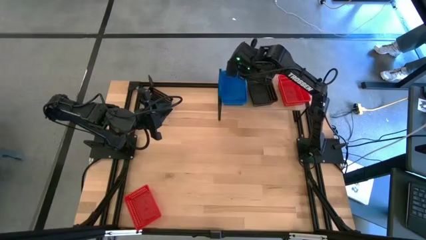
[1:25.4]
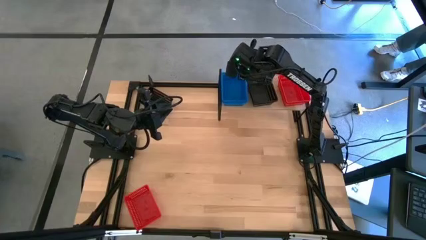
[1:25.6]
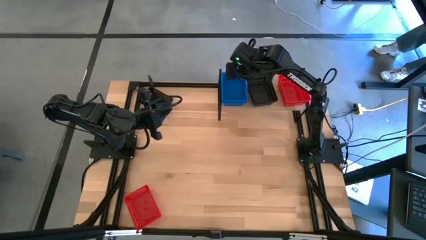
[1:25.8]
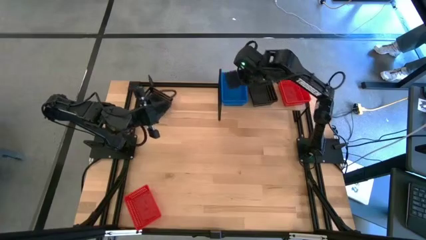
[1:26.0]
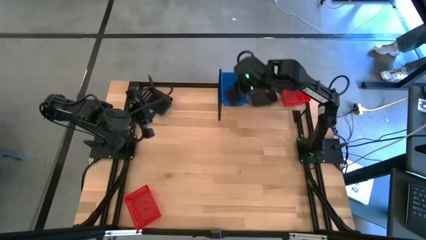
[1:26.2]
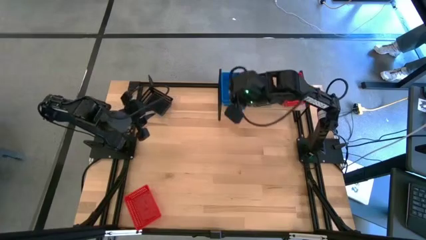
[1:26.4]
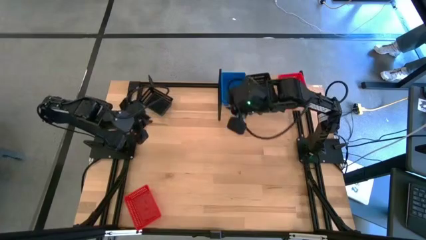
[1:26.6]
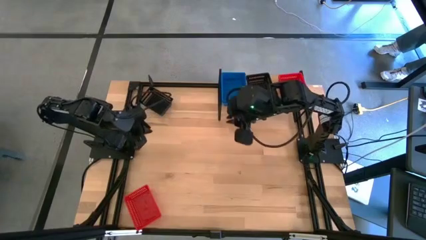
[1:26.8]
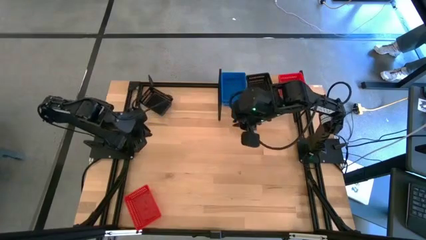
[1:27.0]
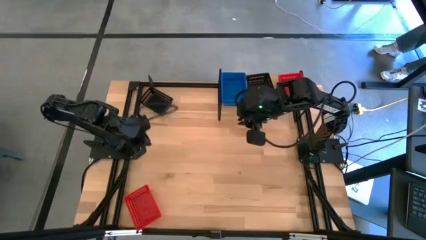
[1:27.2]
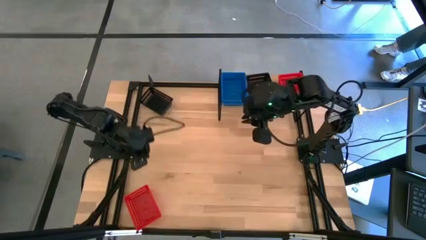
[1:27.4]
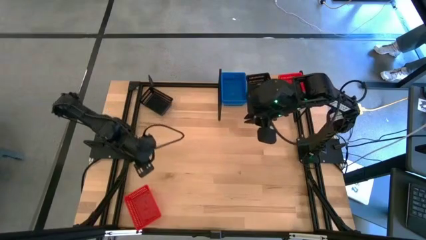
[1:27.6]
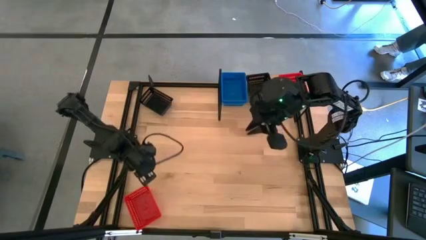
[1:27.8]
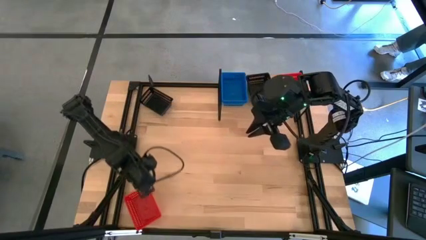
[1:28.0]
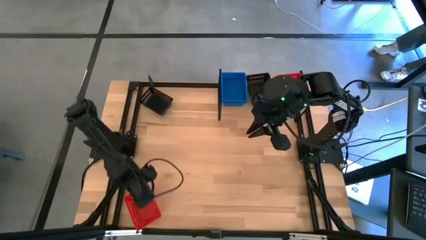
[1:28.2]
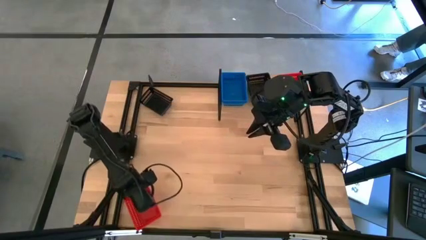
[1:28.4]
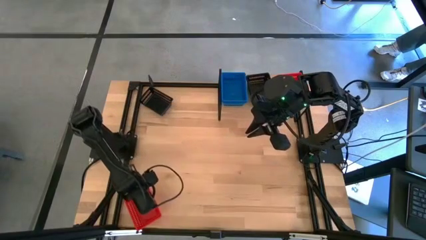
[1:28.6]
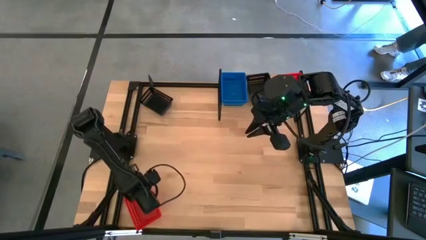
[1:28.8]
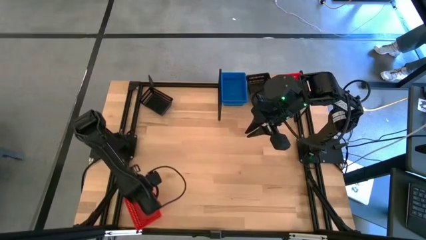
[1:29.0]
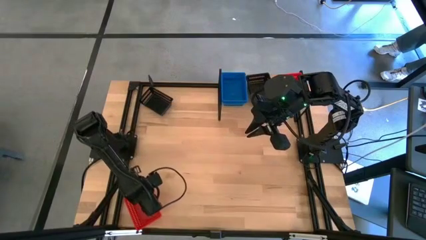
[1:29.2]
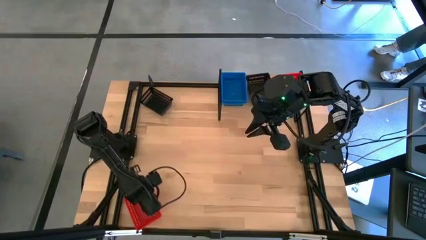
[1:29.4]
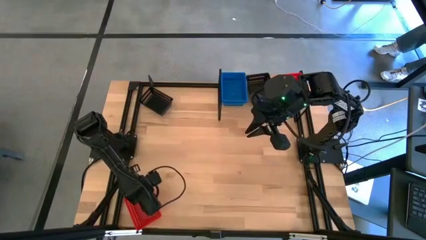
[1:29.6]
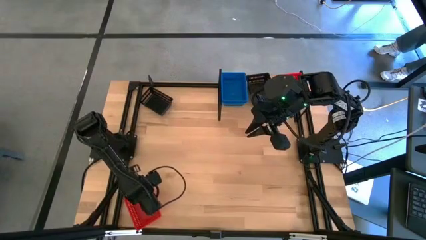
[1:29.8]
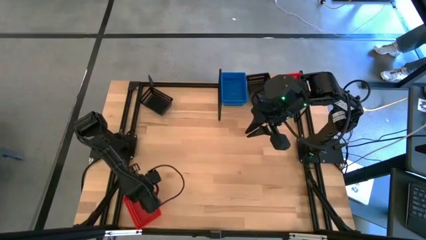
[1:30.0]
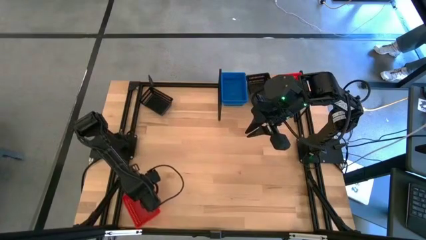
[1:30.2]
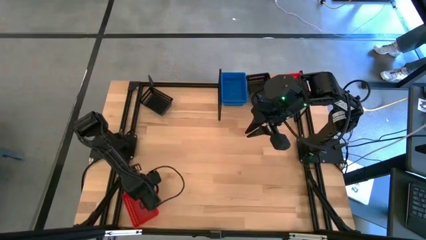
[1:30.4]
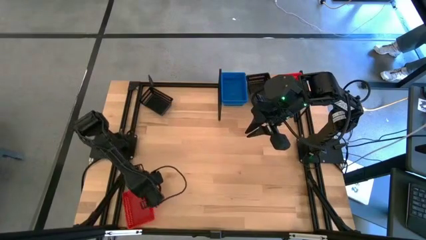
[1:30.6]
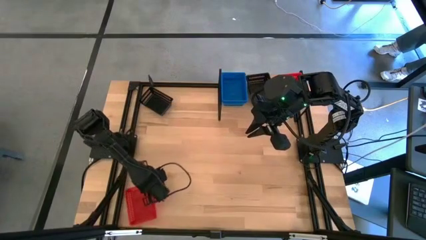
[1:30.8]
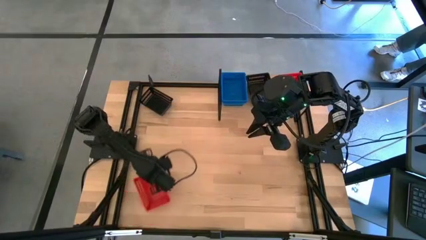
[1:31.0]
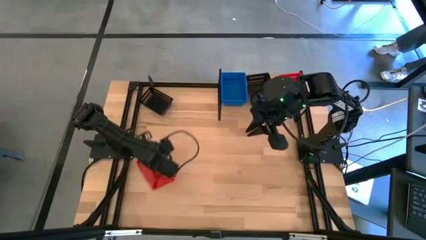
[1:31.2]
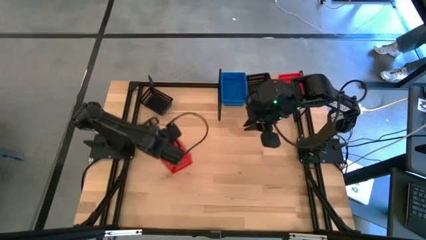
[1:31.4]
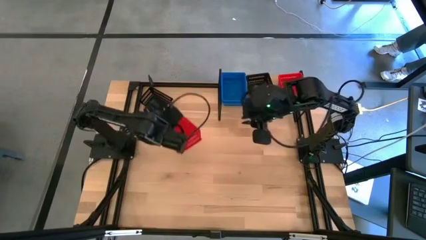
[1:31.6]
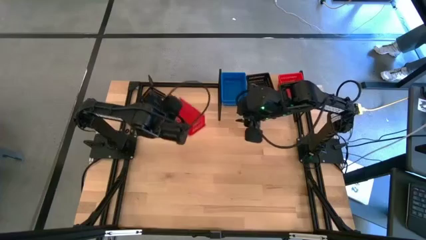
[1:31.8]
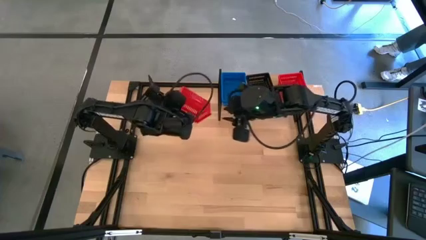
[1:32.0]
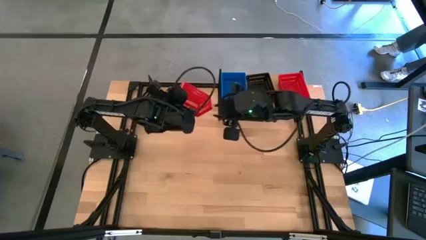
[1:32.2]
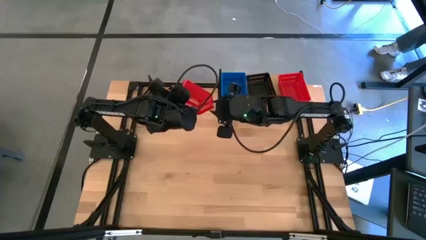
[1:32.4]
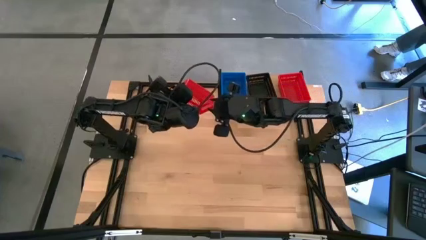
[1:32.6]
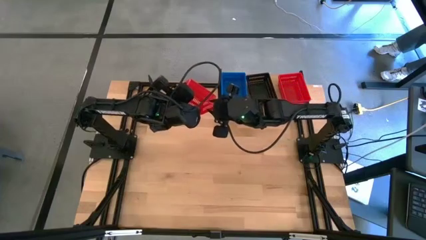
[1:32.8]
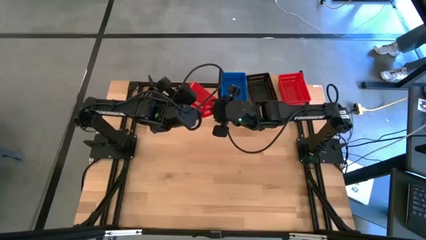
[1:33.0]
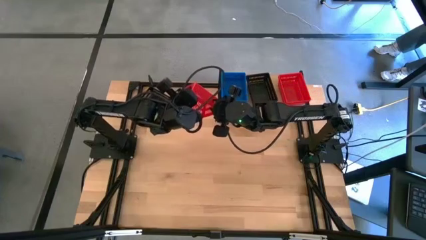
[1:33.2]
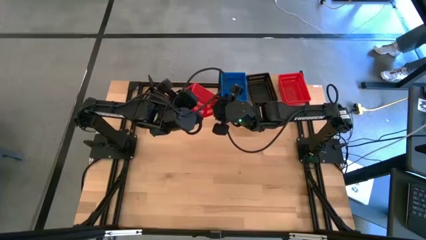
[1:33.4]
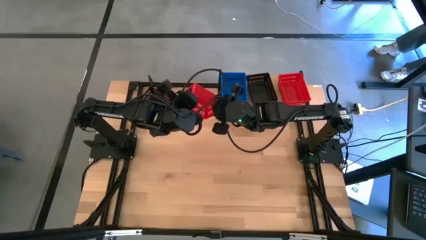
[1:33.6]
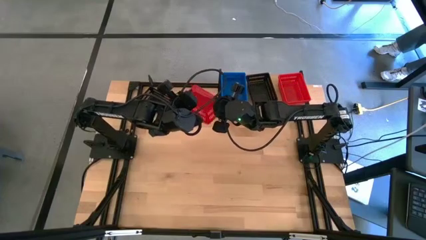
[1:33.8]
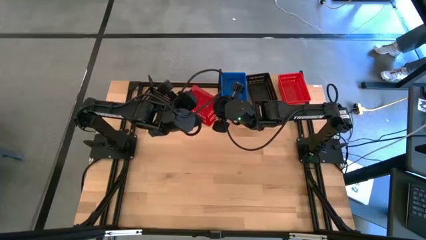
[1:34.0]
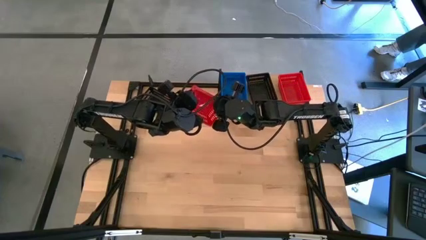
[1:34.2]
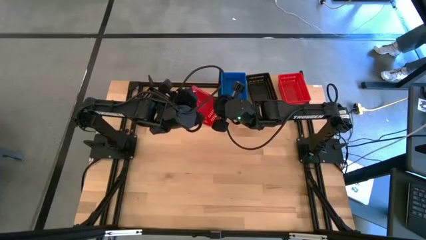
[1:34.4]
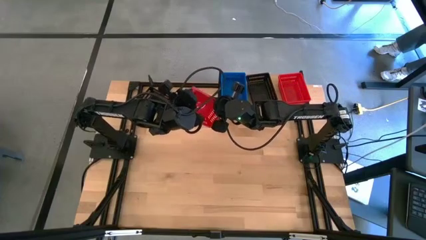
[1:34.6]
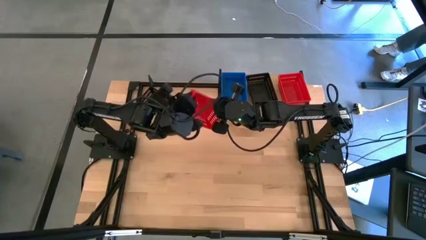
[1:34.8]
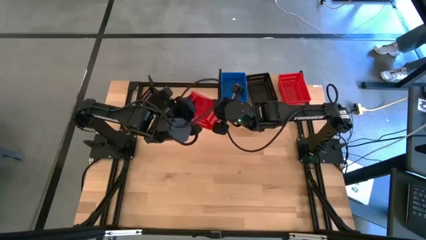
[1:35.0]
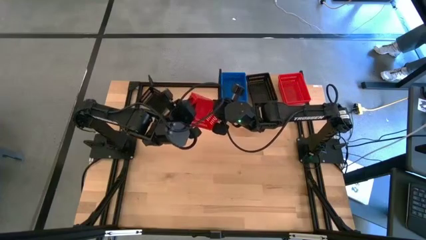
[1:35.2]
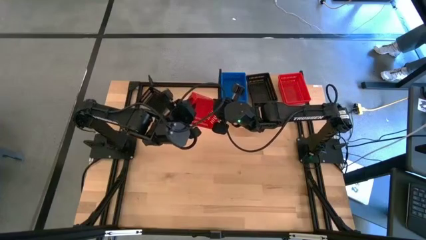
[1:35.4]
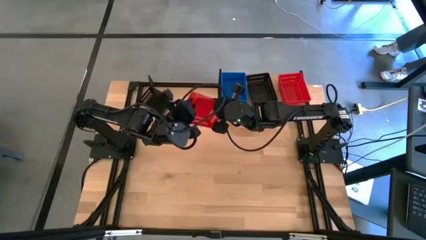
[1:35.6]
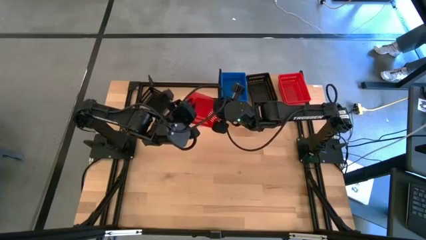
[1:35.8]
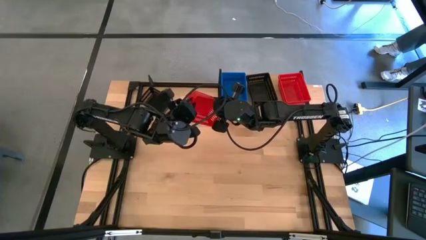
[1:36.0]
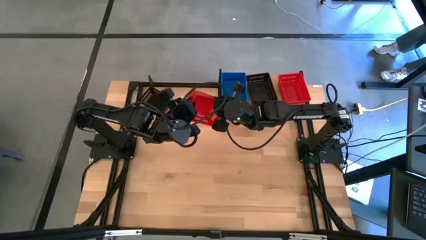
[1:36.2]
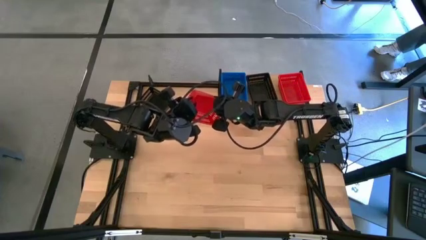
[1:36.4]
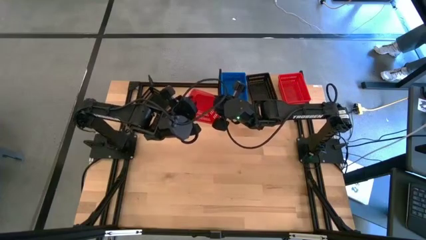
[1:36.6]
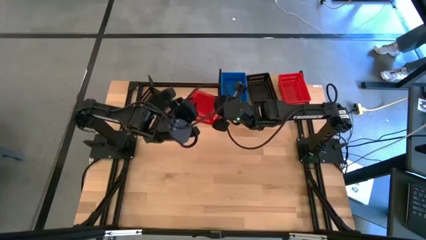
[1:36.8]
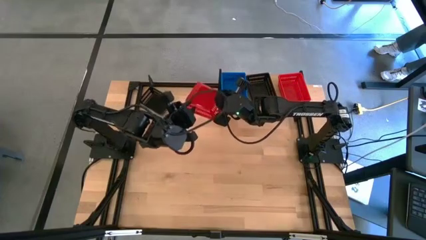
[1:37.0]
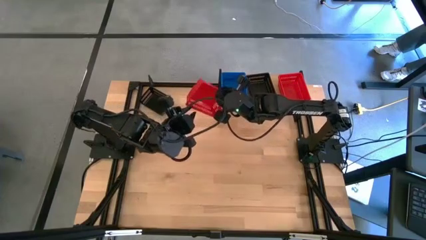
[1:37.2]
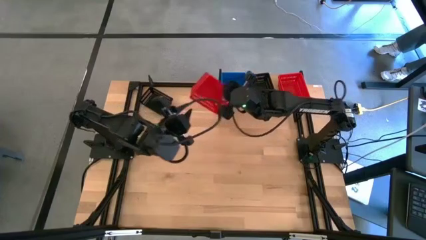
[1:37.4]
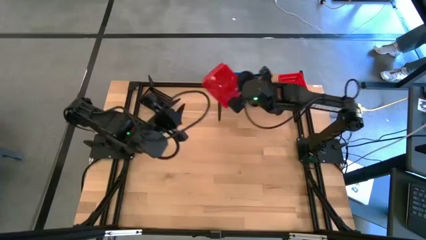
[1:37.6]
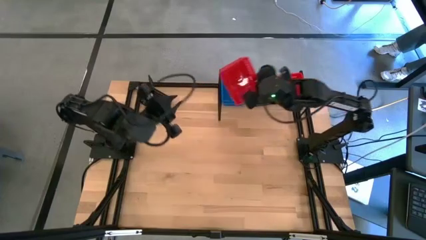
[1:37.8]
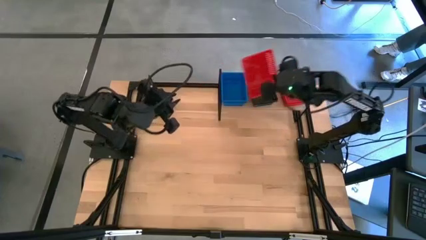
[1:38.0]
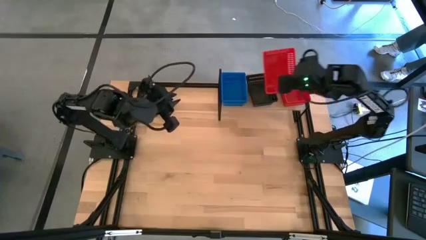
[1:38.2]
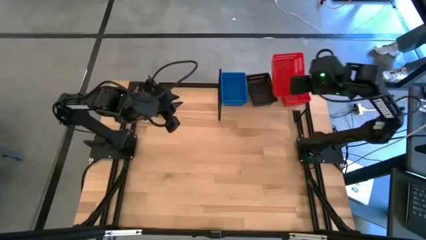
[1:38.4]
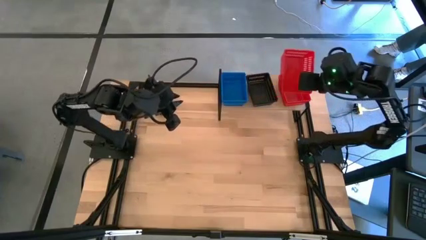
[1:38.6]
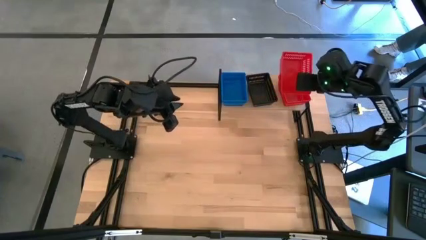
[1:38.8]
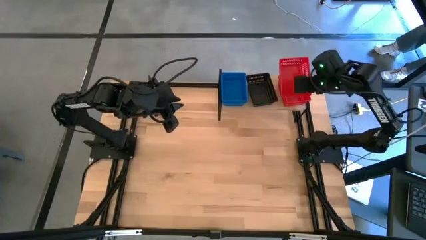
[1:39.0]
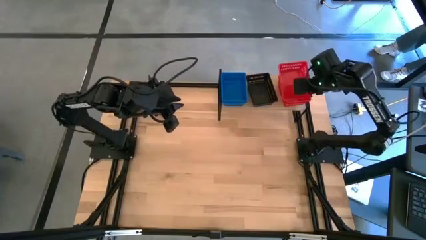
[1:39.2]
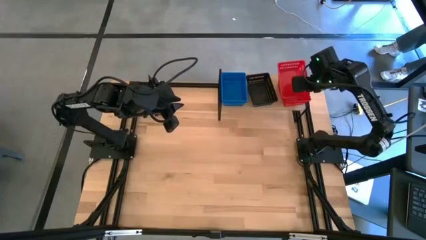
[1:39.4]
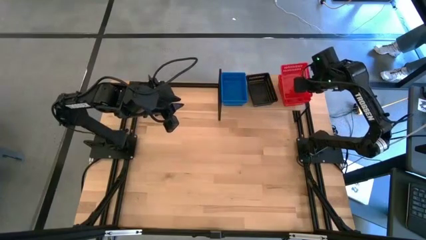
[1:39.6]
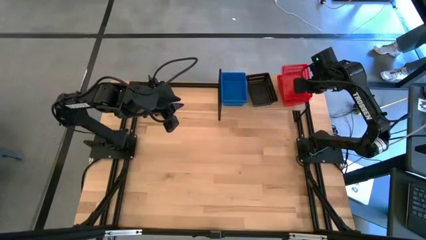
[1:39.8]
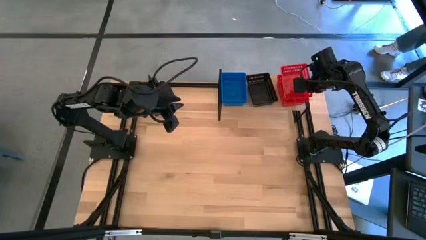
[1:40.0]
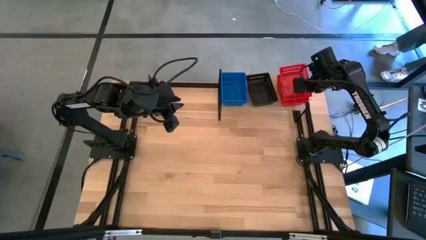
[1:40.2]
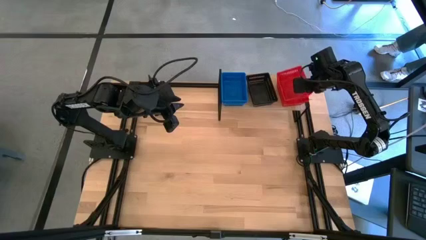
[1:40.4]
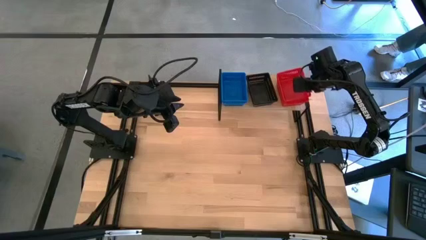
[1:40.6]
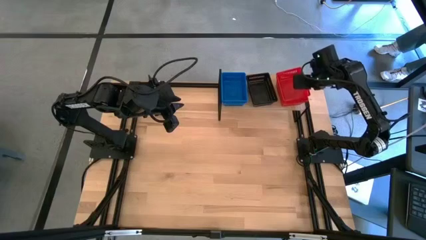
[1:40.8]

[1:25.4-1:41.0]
Task: Stack baskets on shelf by color
Stack the red bin on the red bin on the shelf
